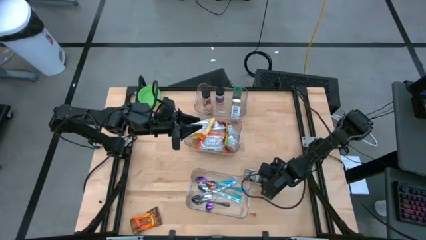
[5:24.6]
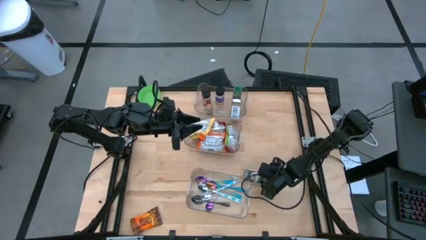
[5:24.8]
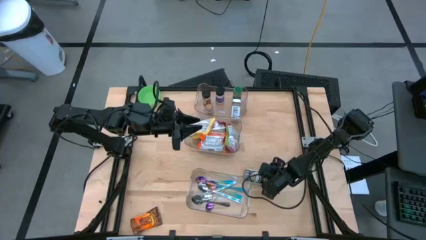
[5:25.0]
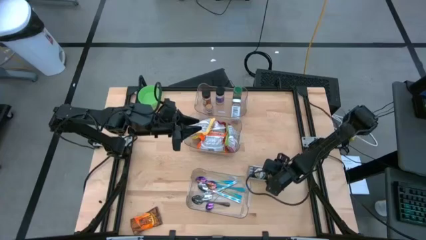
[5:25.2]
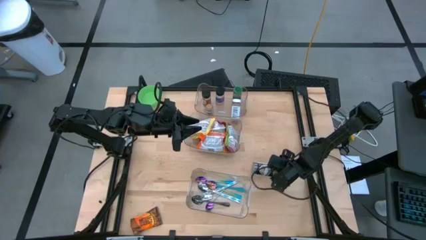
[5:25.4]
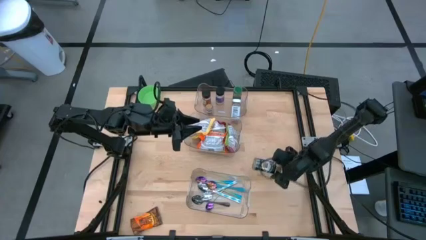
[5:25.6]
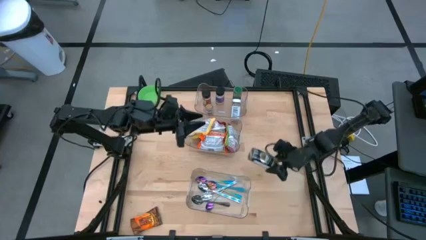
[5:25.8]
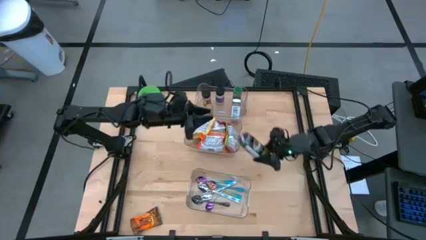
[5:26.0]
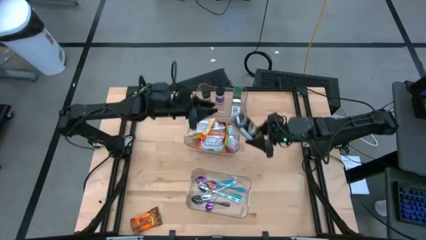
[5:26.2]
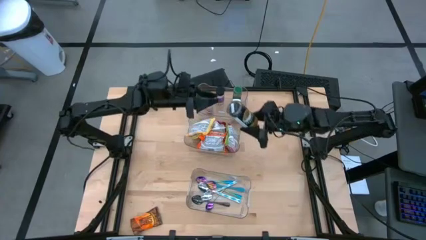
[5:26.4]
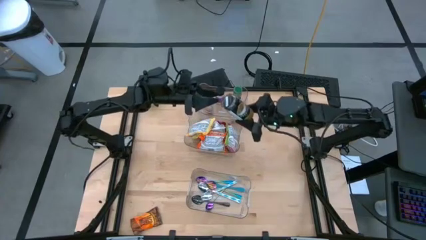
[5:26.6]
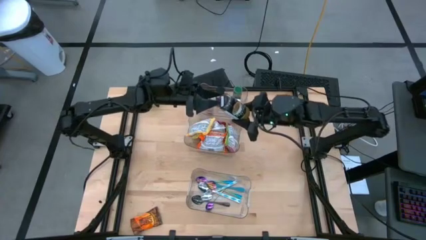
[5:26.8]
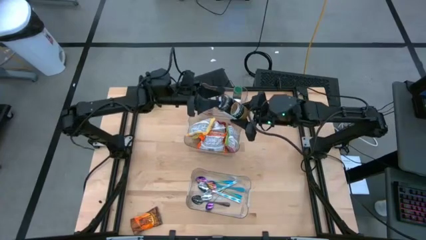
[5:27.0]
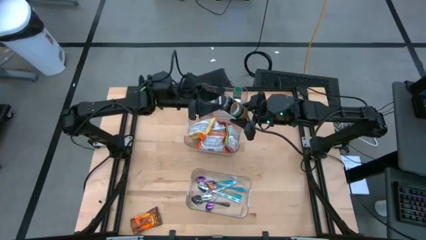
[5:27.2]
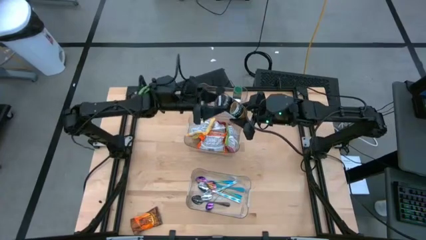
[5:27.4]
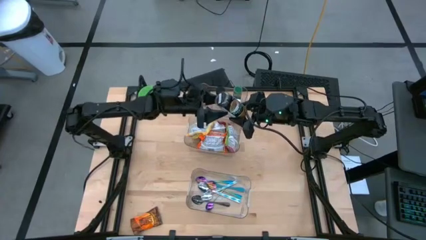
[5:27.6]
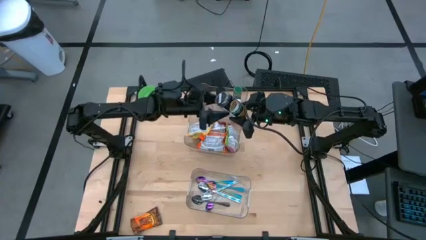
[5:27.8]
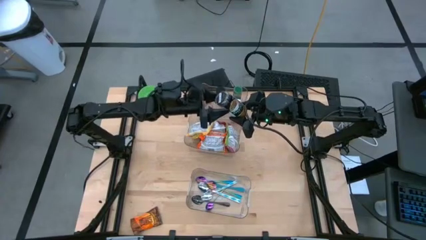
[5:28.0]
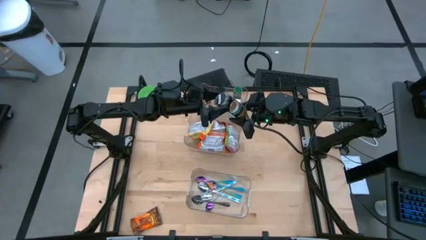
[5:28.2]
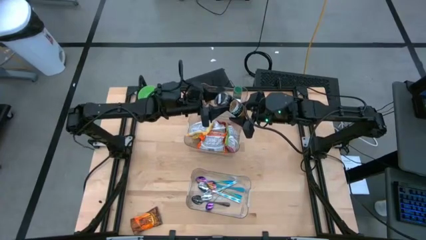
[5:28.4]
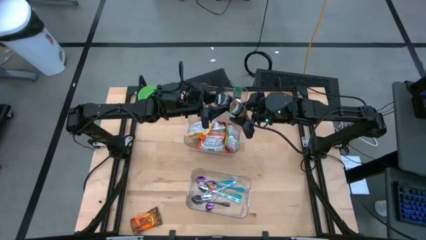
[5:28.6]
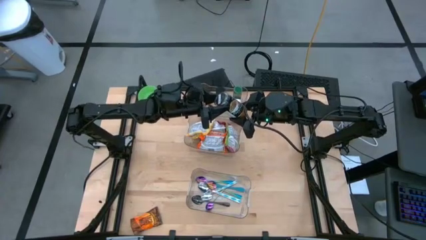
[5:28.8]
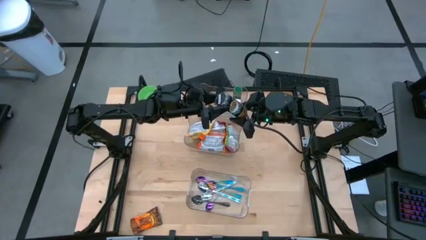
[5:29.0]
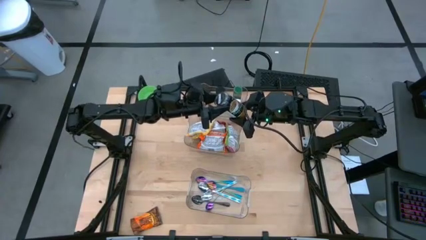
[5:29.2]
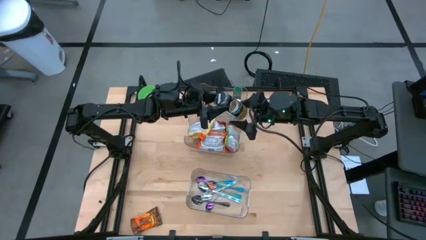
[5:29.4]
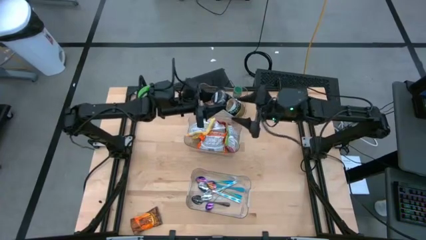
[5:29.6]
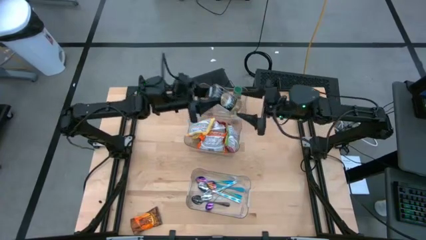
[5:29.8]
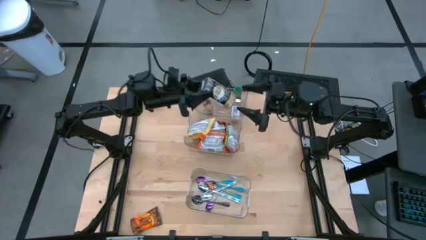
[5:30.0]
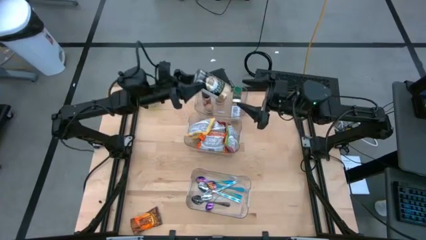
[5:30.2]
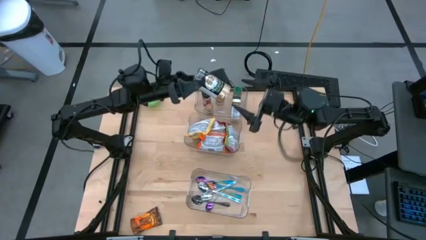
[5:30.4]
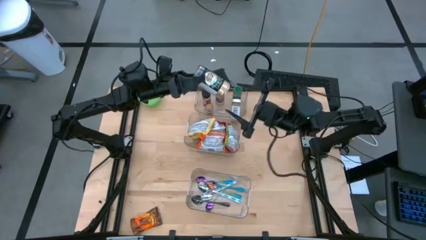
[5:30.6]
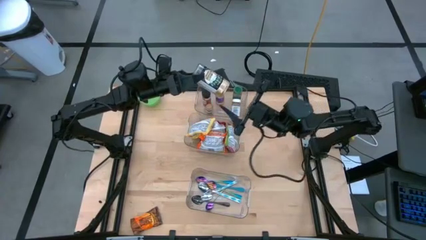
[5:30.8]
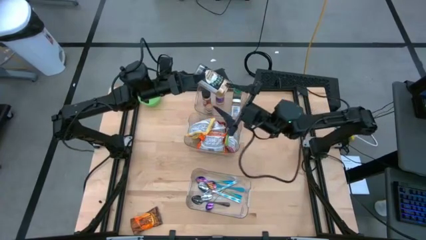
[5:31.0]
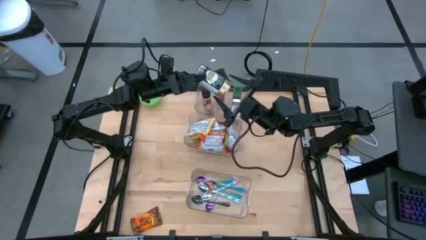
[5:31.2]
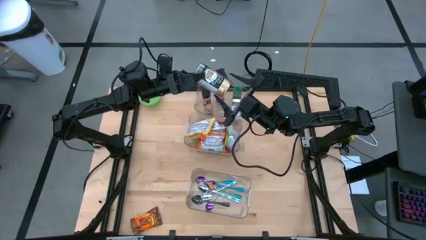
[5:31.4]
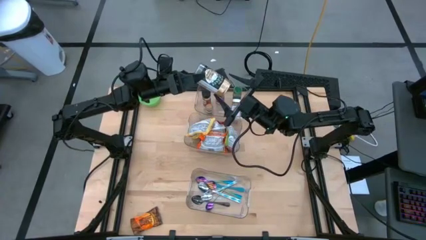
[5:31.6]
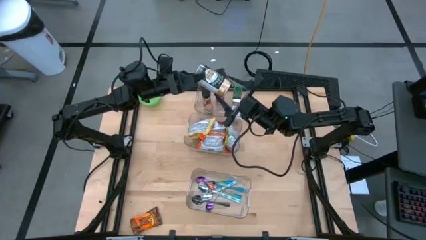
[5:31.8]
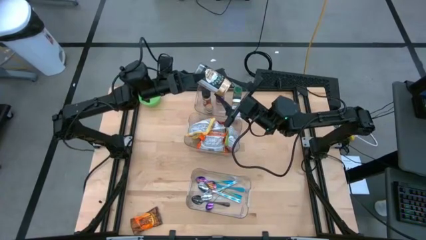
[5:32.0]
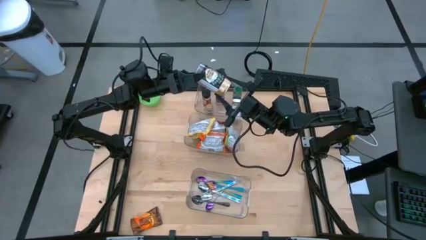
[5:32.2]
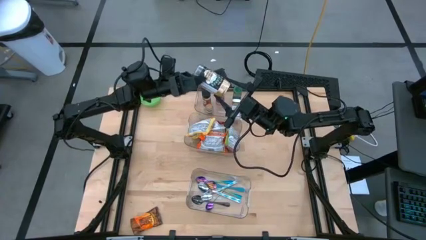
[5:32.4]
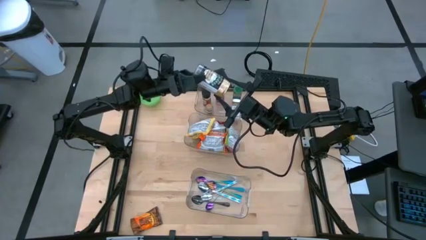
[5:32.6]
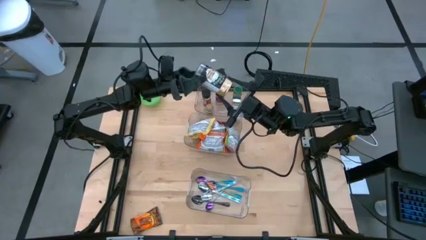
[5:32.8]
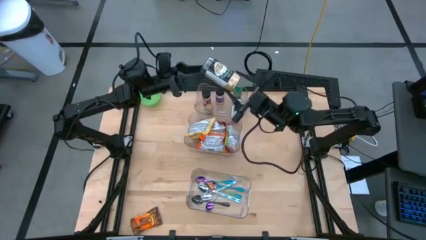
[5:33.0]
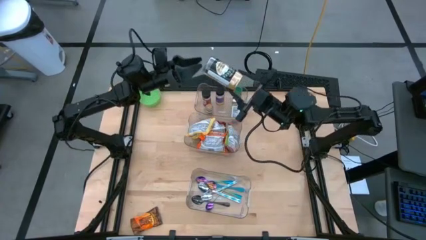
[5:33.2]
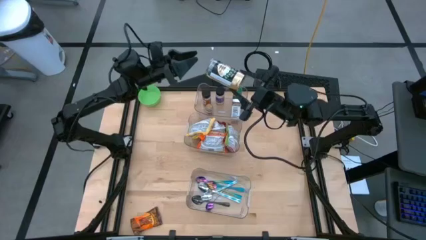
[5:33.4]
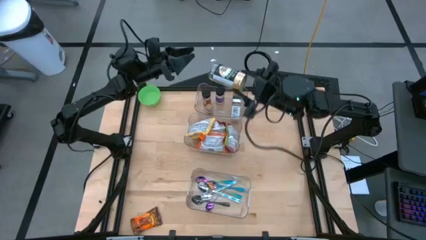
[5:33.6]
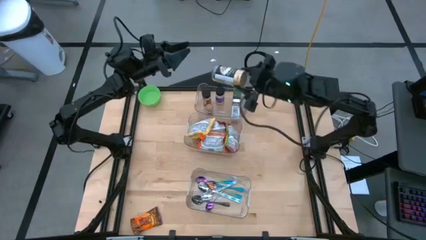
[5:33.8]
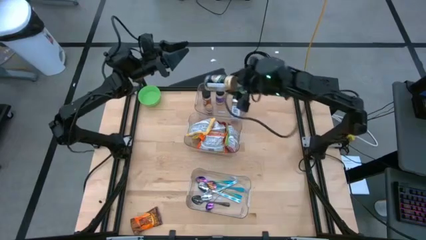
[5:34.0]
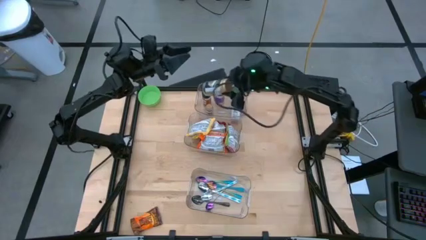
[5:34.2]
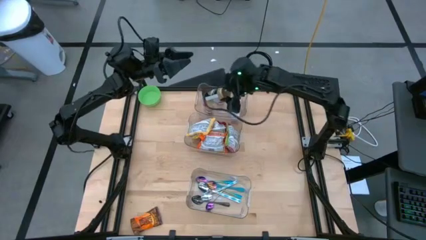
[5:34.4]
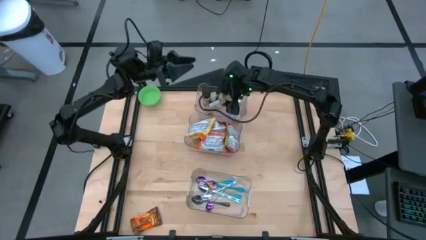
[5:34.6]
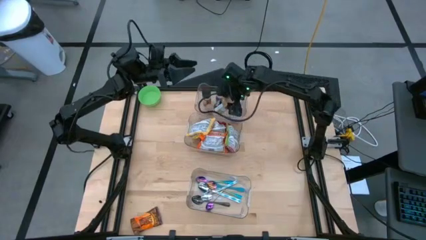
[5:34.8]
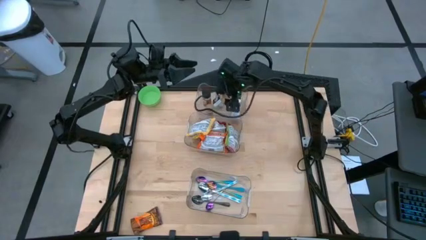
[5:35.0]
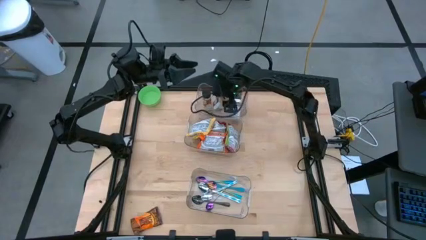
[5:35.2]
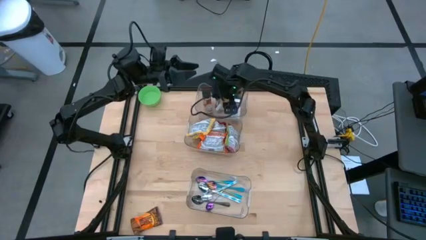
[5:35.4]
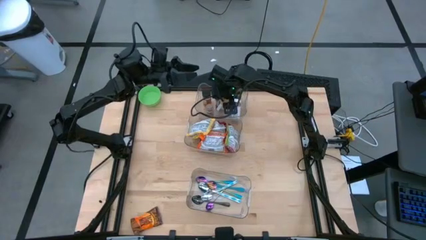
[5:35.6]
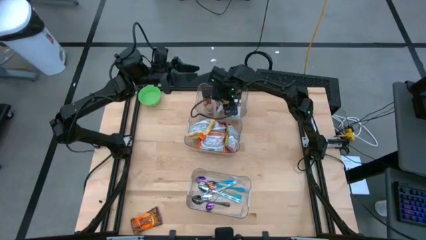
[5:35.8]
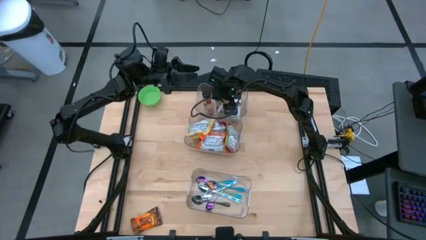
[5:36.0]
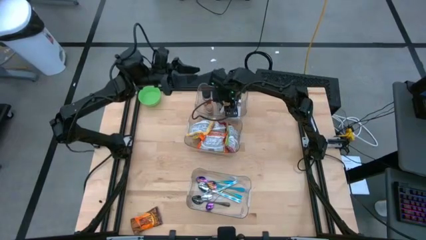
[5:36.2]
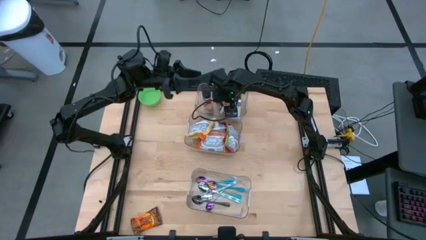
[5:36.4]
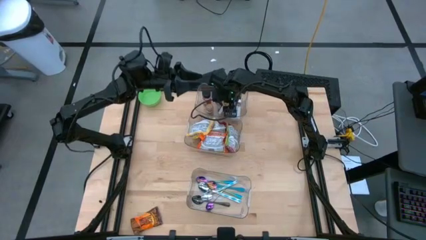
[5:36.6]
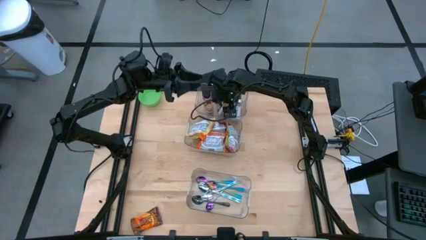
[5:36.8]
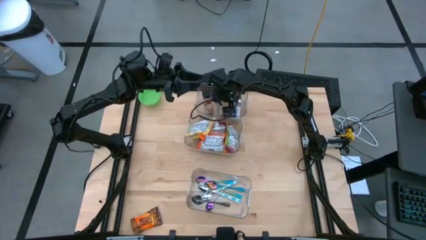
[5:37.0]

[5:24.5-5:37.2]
Task: Pick & Place Food Item
Put the gold seasoning bottle into the top transparent bin
